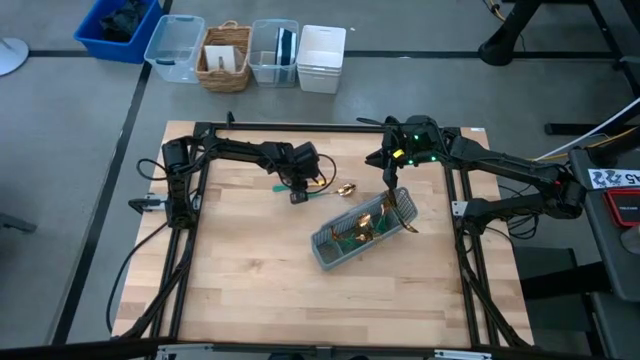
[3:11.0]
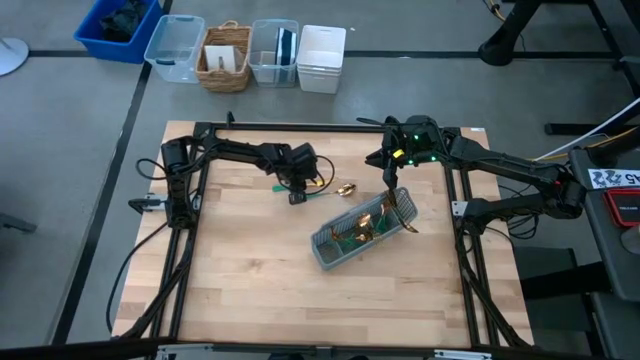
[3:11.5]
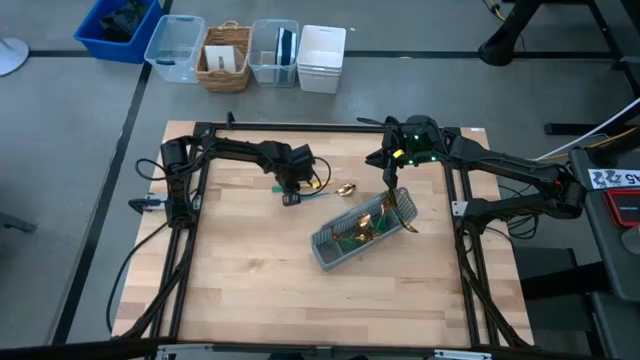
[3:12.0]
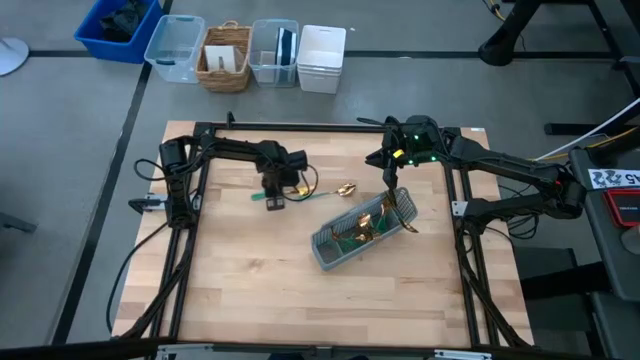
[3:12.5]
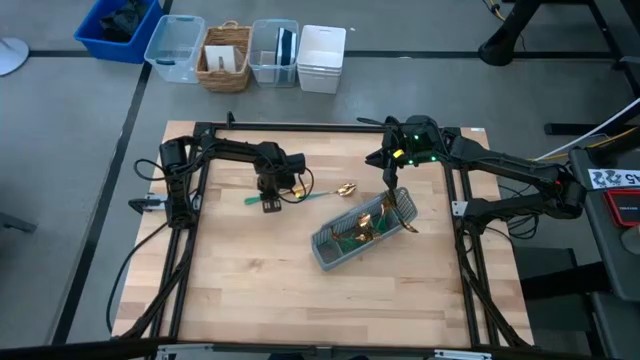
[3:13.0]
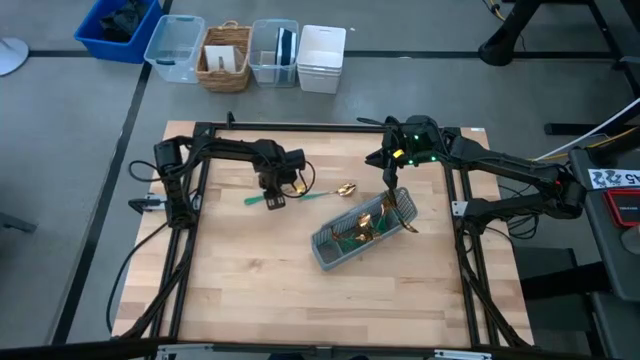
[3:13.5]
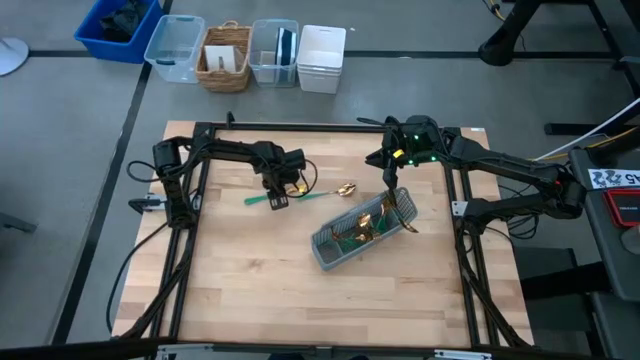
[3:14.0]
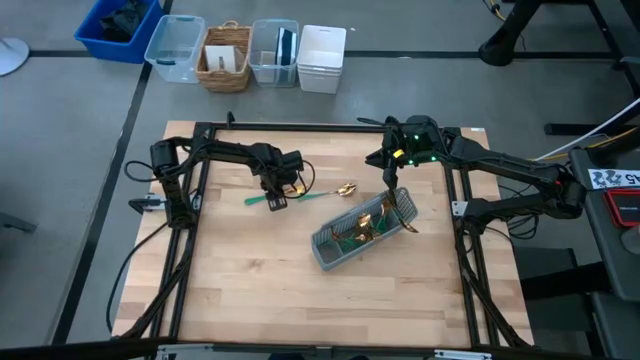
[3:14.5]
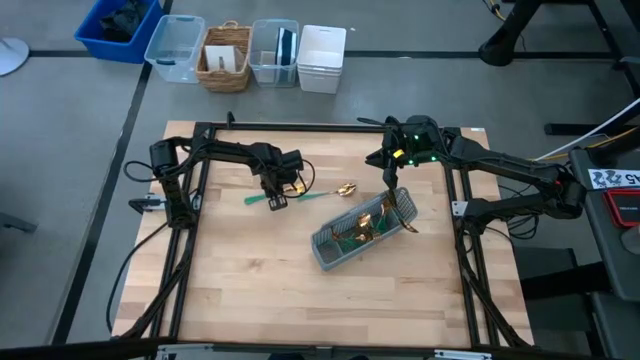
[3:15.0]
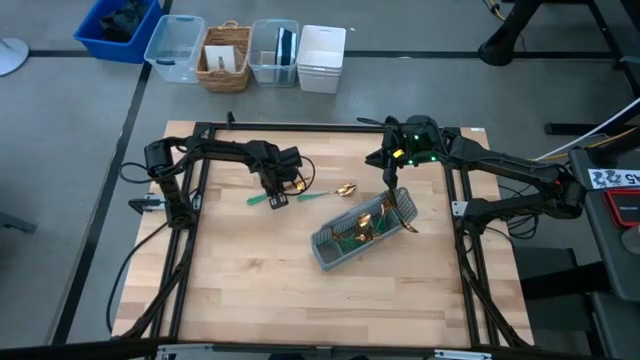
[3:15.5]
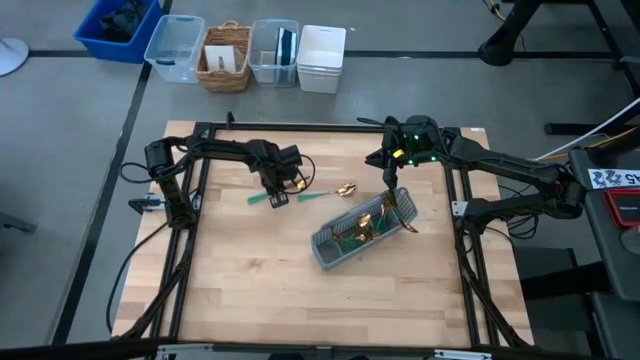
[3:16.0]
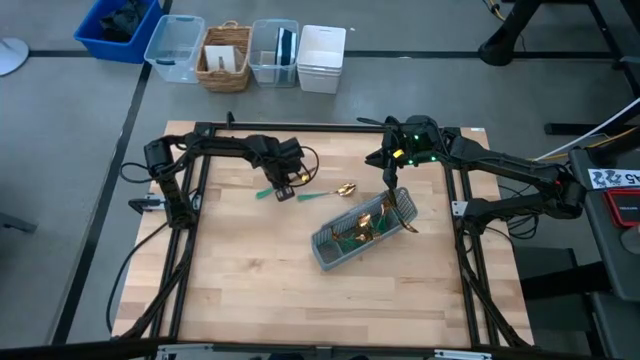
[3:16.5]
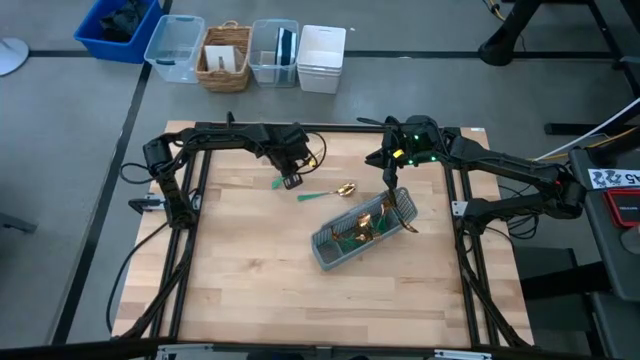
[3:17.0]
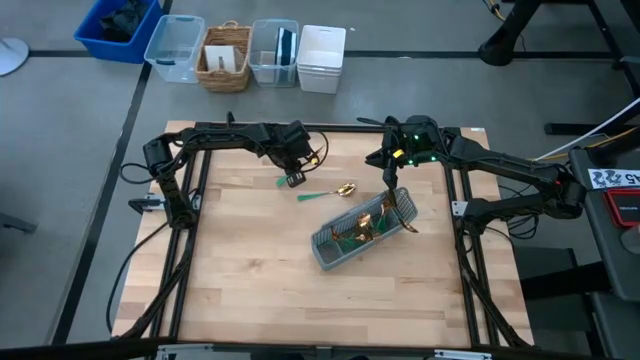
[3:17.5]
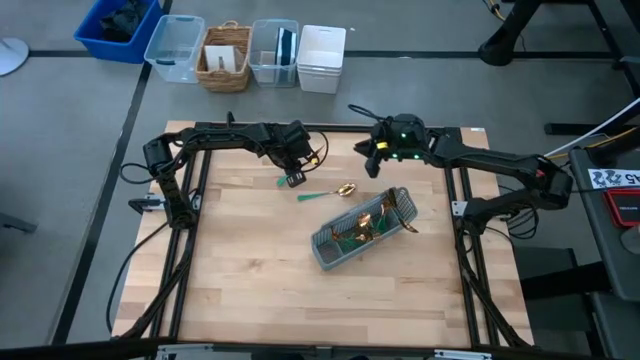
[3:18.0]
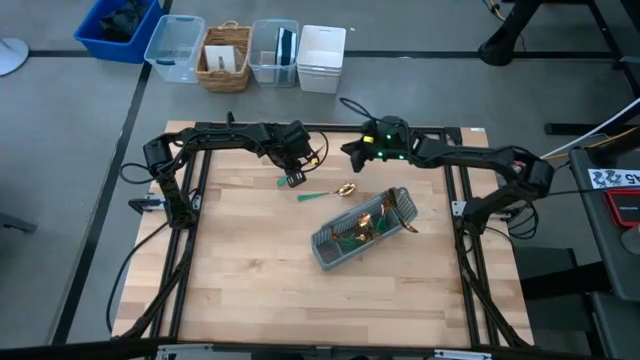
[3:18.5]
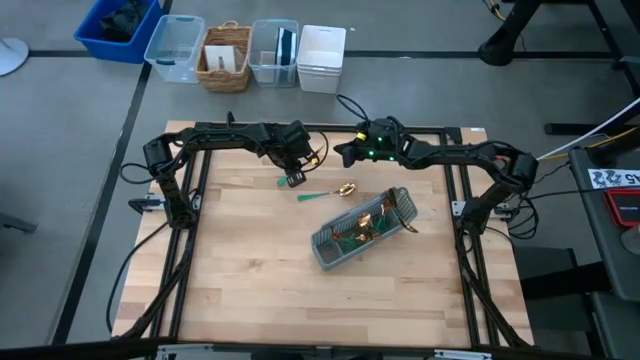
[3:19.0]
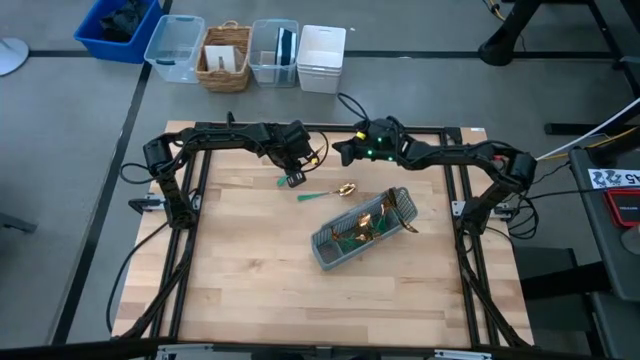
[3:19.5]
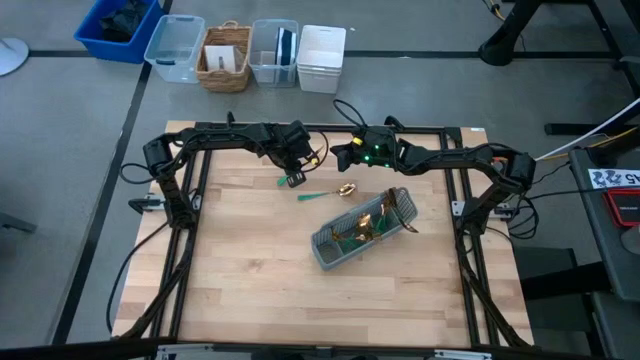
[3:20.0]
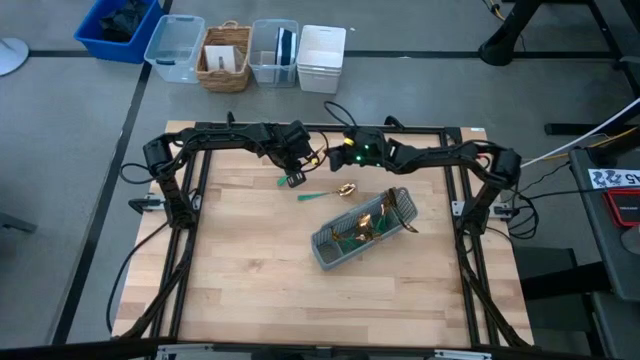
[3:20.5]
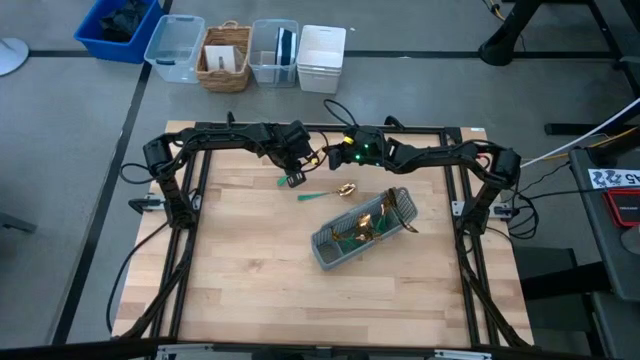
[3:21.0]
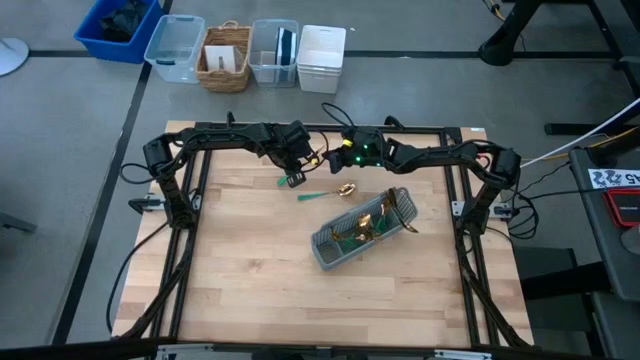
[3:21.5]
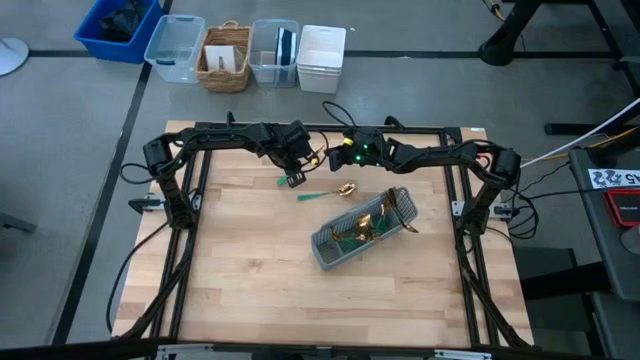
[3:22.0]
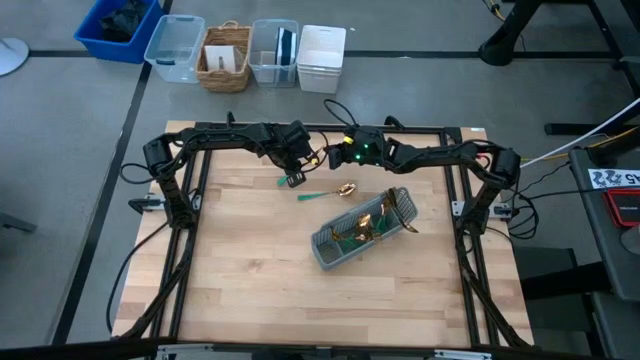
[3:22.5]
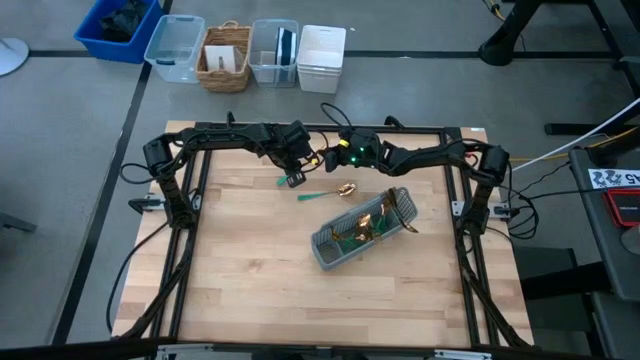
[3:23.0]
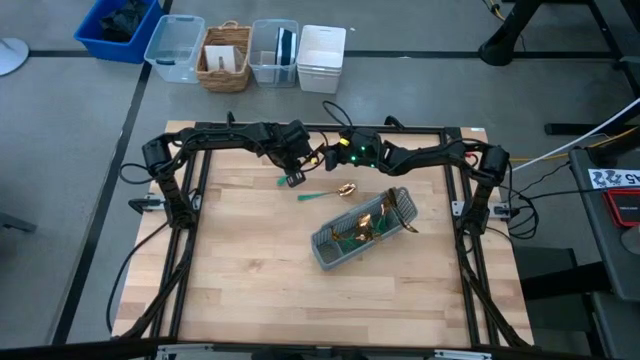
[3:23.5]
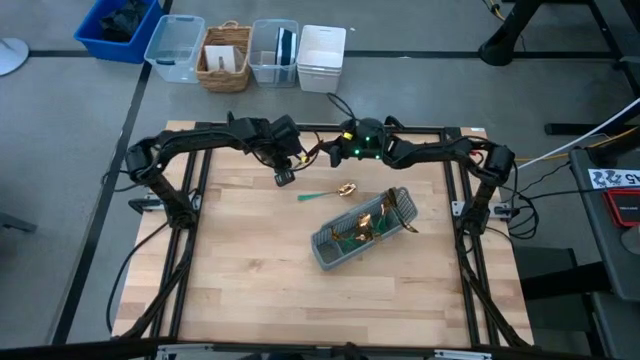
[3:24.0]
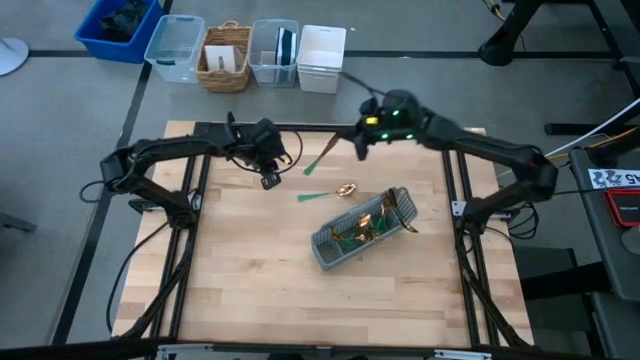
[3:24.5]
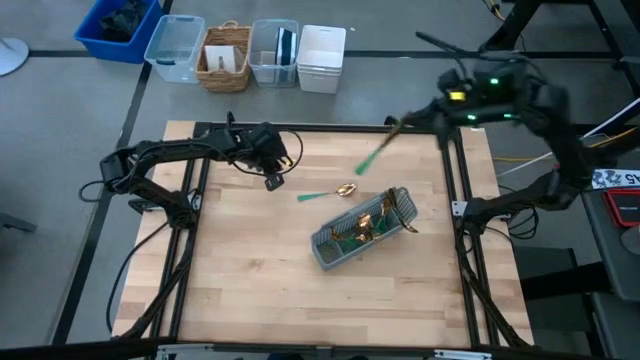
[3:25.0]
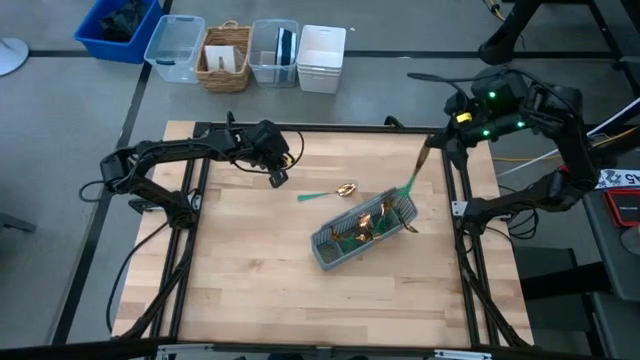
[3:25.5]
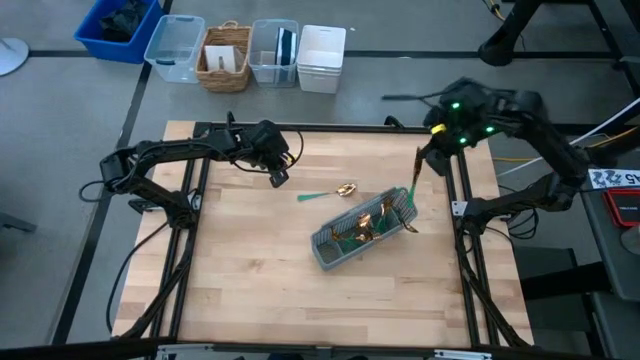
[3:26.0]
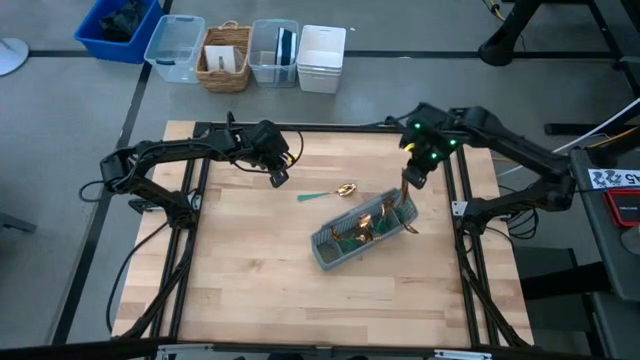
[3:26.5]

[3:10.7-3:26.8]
Task: Sort silverware
Put the gold knife into the gray silverware organizer

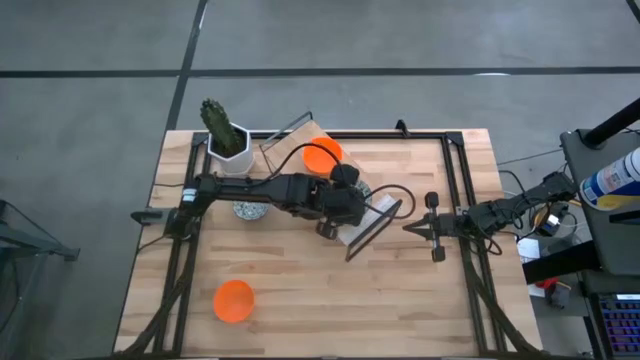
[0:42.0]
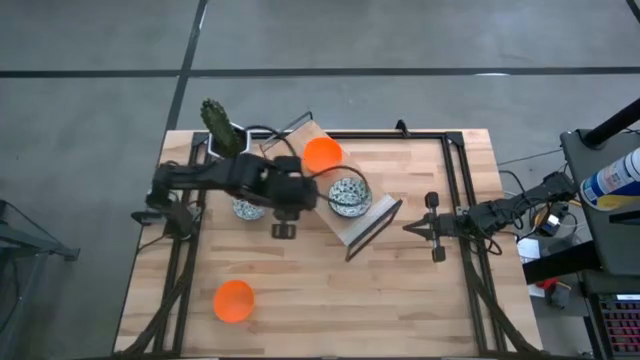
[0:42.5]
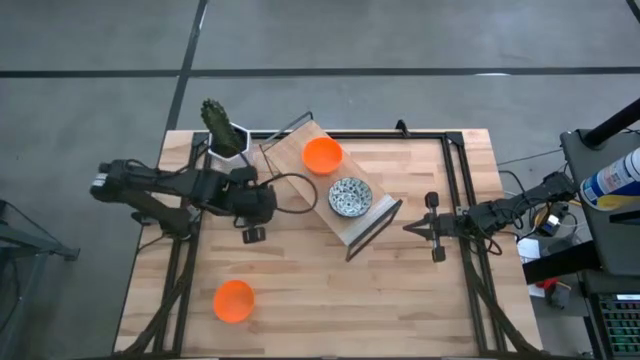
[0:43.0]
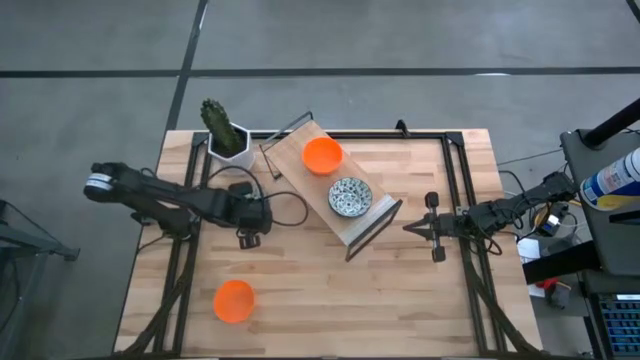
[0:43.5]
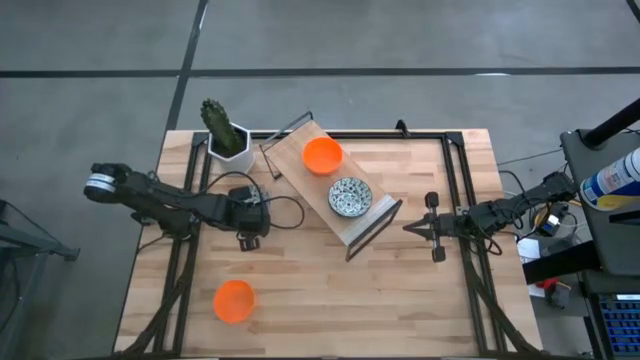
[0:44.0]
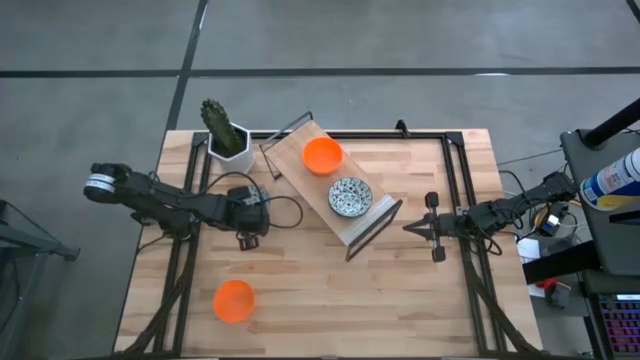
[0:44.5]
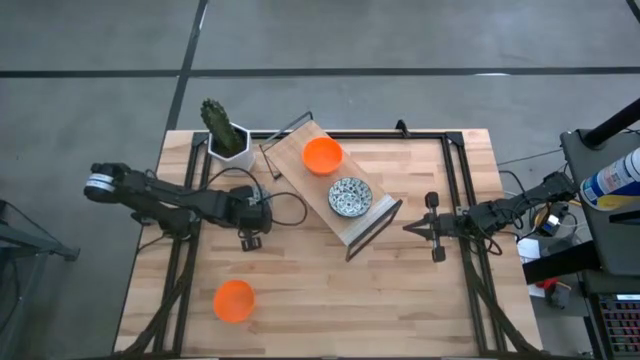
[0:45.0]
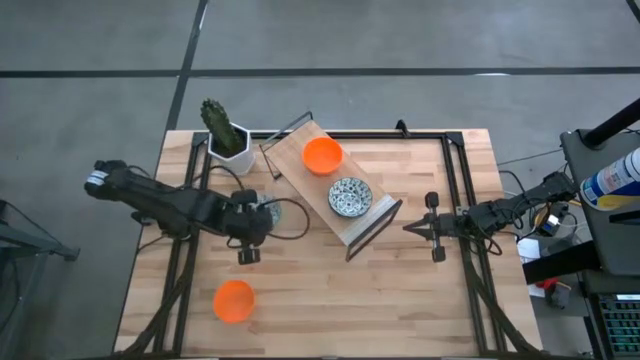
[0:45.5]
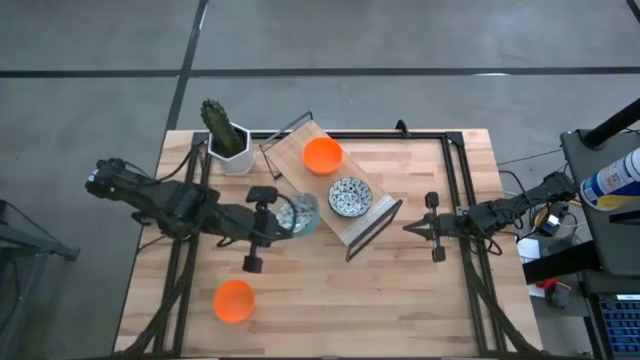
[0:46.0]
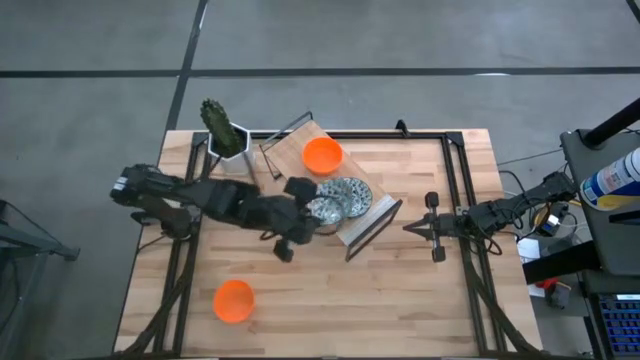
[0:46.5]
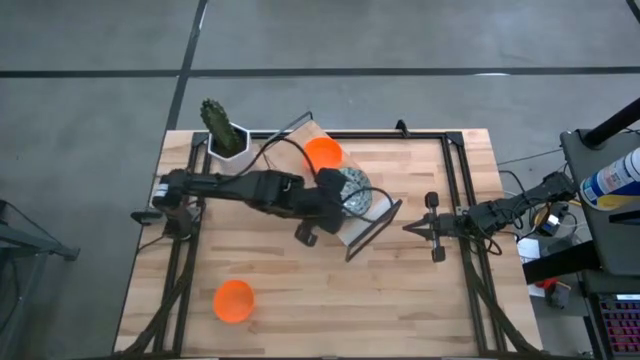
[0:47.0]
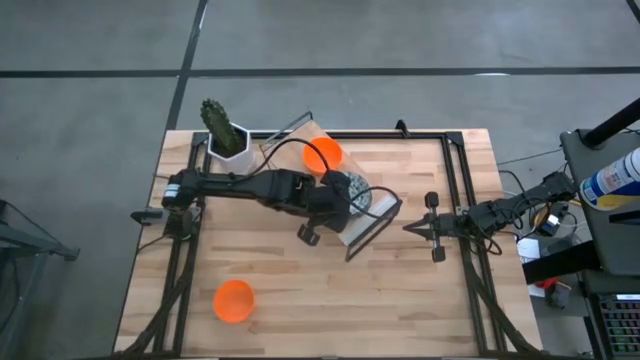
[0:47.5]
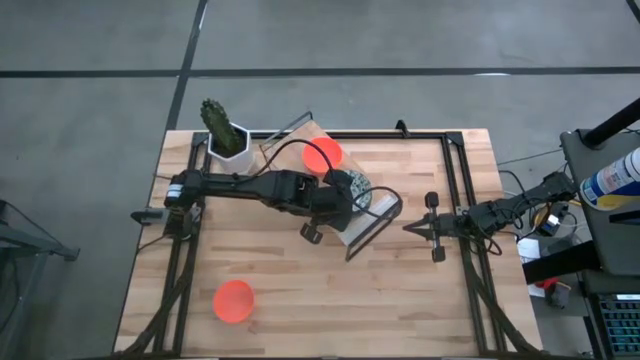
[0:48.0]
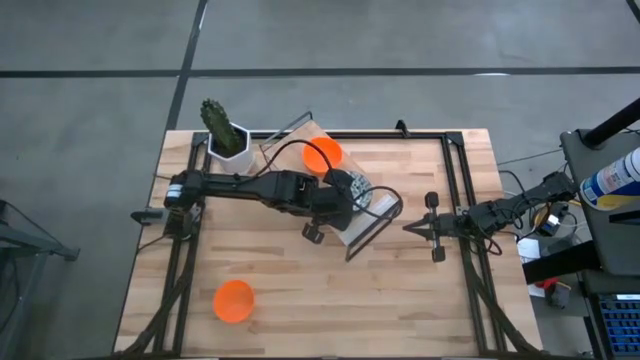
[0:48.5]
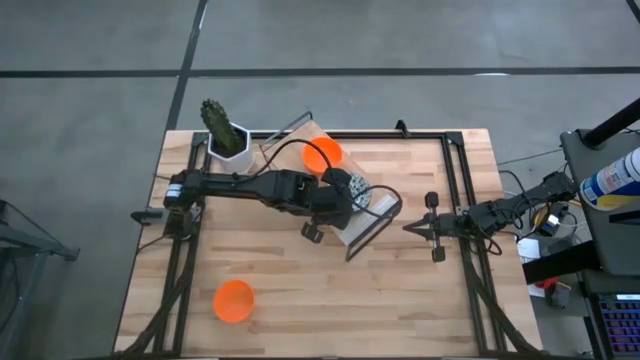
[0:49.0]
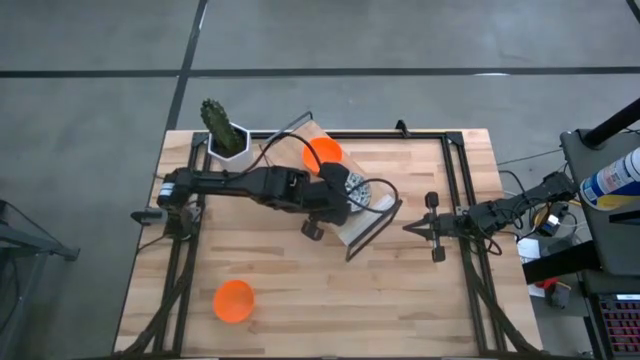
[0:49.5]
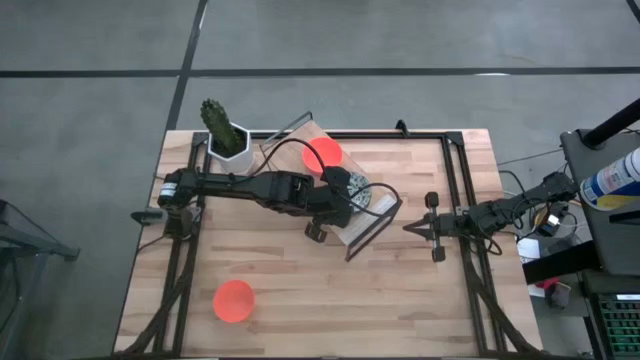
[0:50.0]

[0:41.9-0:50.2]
Task: Pick & Place Mini bowls
Stack the blue patterned bowl on top of the blue patterned bowl on the shelf
